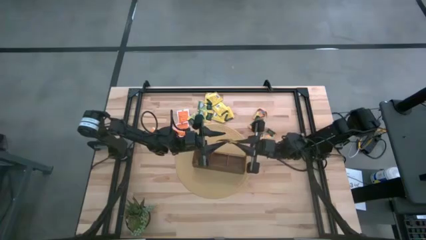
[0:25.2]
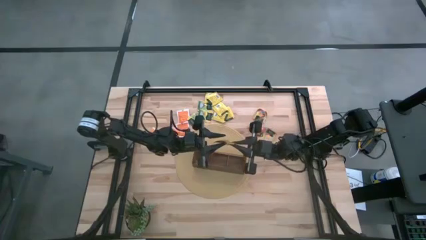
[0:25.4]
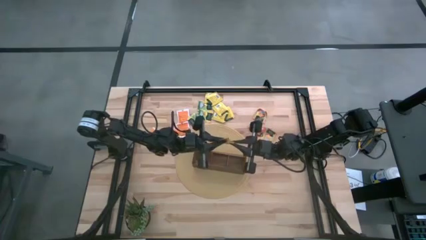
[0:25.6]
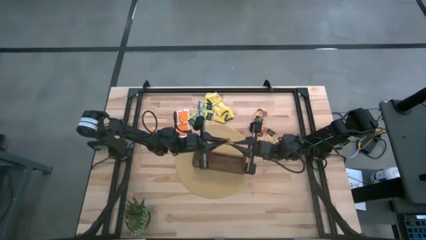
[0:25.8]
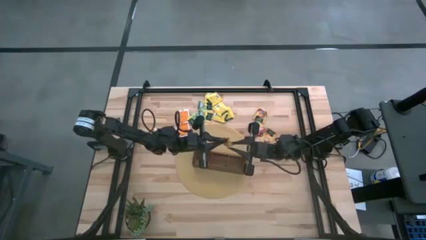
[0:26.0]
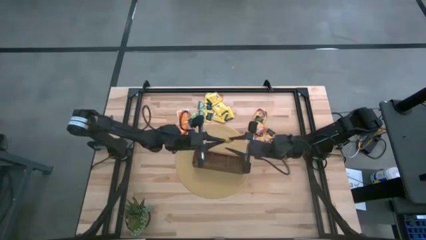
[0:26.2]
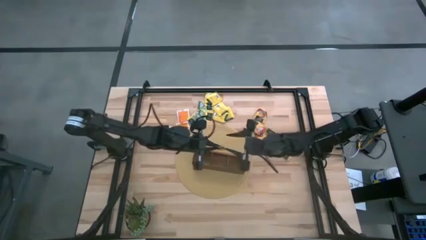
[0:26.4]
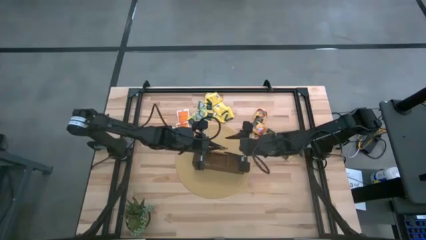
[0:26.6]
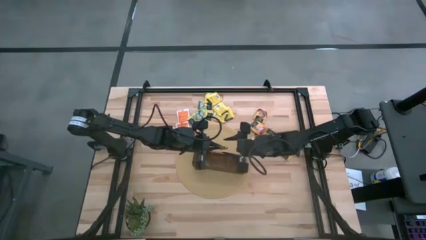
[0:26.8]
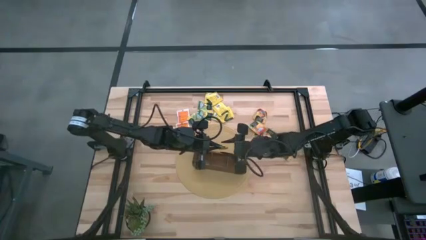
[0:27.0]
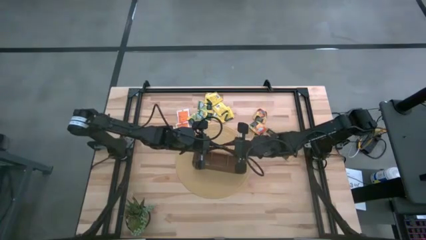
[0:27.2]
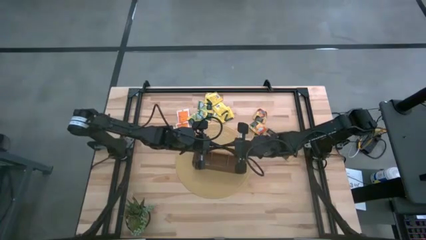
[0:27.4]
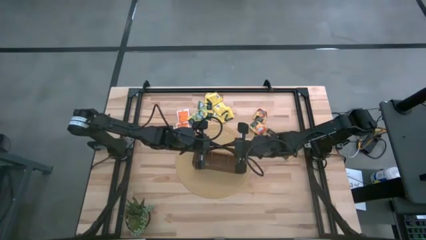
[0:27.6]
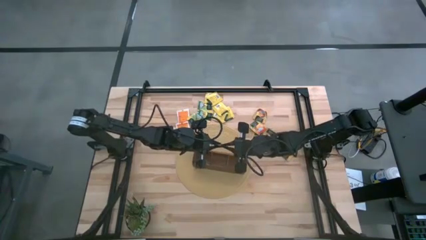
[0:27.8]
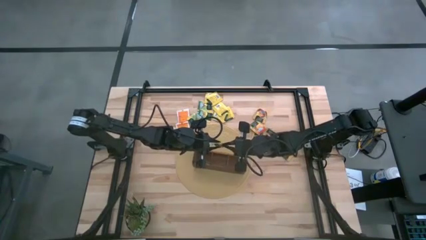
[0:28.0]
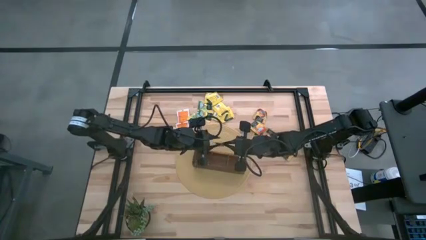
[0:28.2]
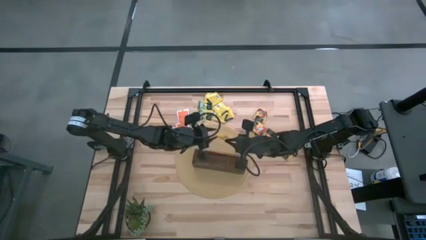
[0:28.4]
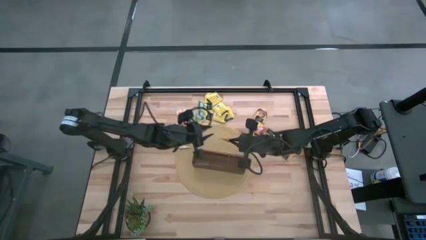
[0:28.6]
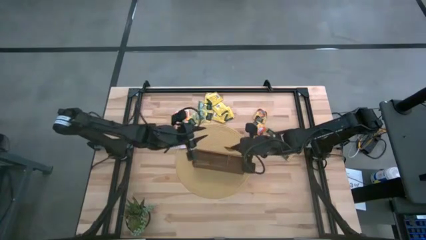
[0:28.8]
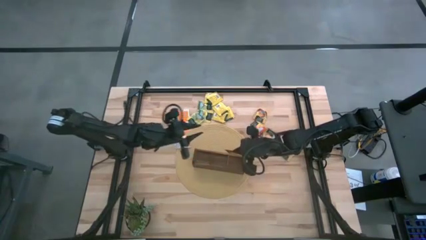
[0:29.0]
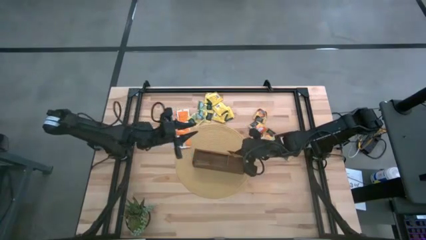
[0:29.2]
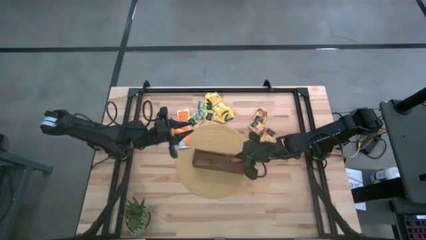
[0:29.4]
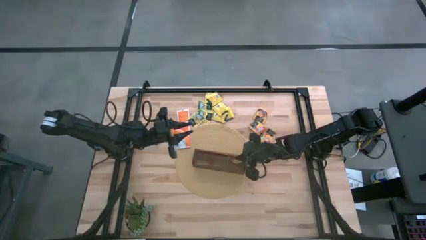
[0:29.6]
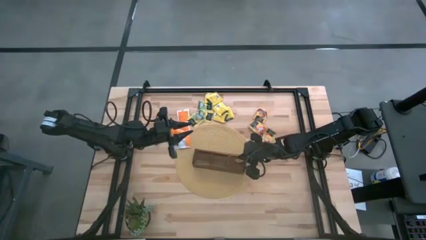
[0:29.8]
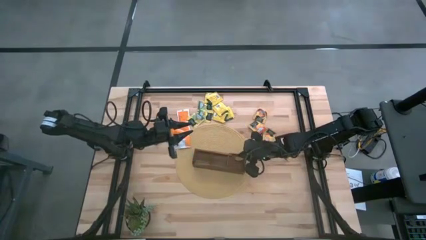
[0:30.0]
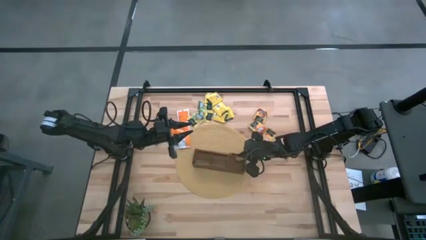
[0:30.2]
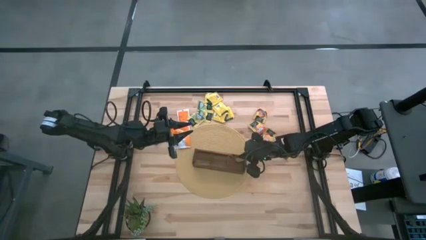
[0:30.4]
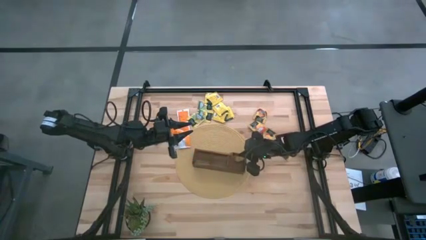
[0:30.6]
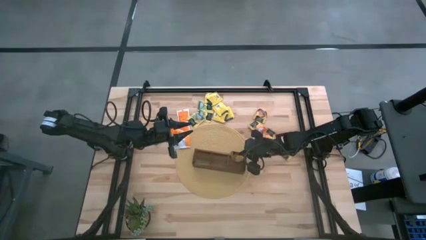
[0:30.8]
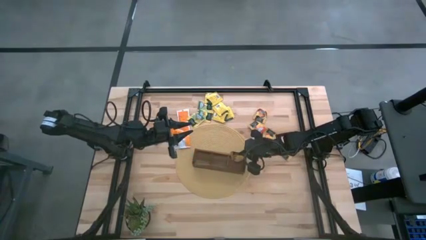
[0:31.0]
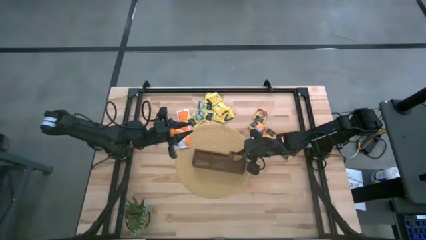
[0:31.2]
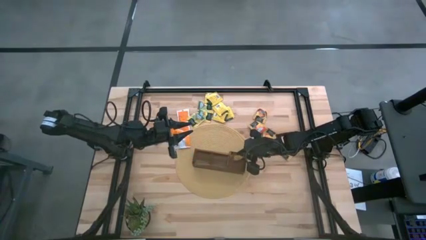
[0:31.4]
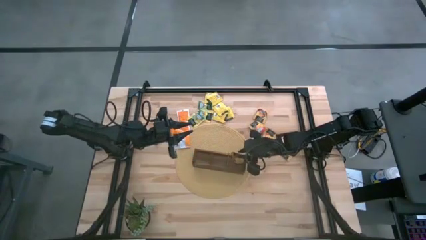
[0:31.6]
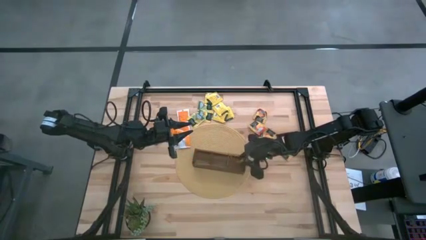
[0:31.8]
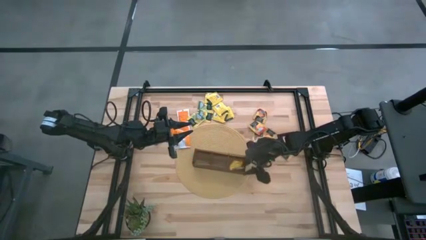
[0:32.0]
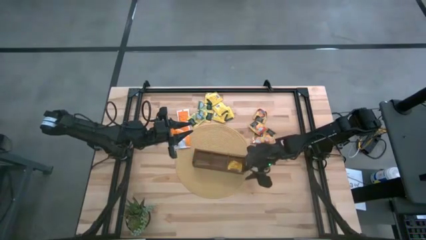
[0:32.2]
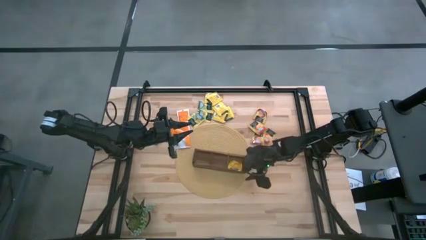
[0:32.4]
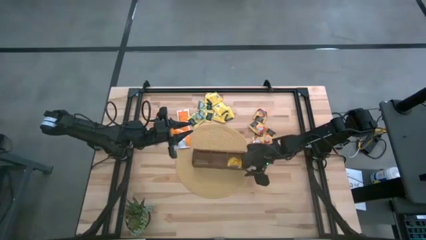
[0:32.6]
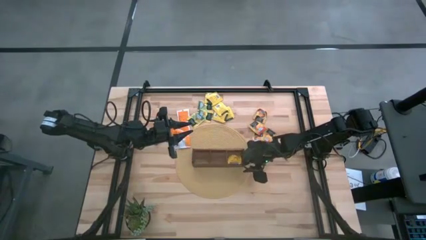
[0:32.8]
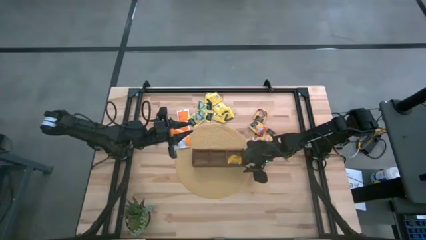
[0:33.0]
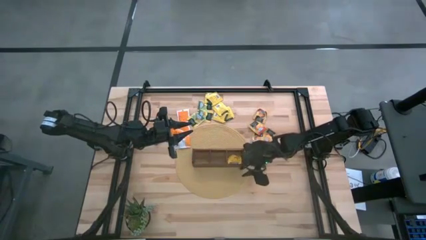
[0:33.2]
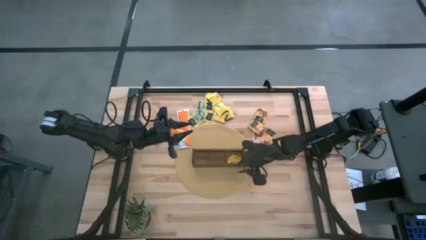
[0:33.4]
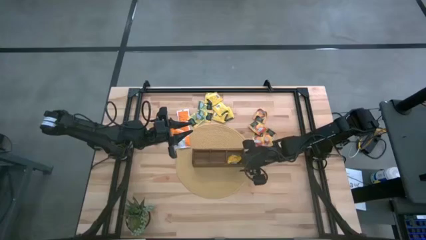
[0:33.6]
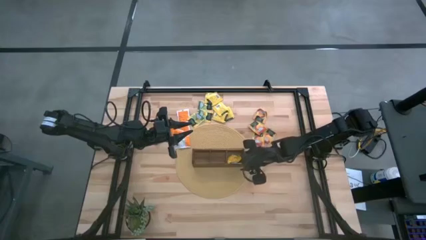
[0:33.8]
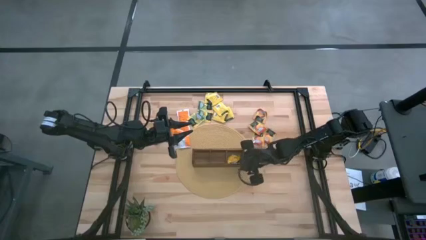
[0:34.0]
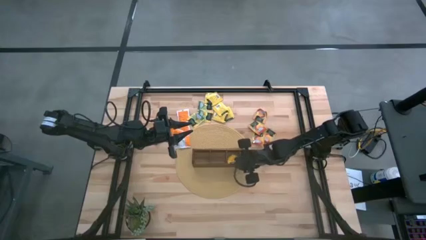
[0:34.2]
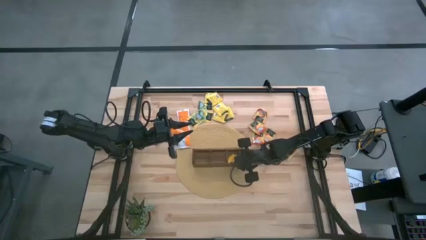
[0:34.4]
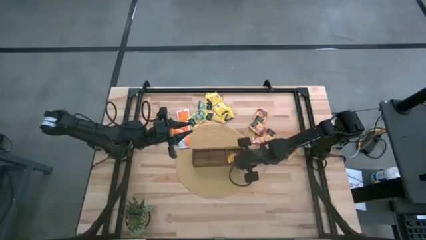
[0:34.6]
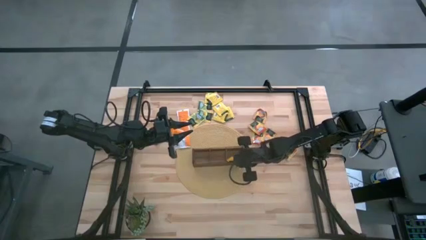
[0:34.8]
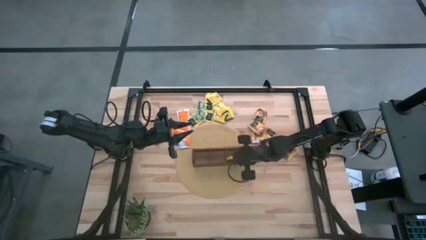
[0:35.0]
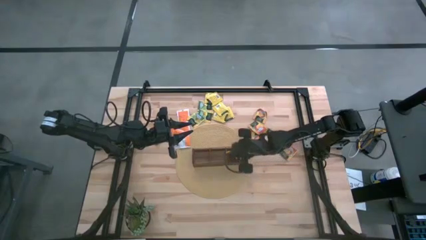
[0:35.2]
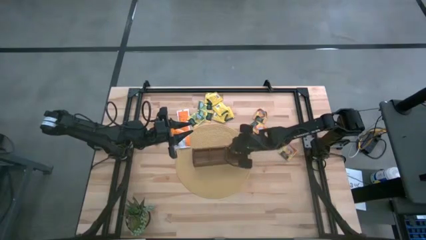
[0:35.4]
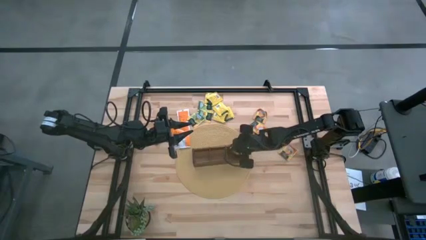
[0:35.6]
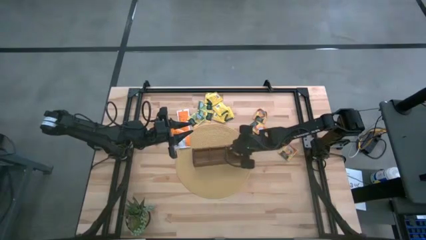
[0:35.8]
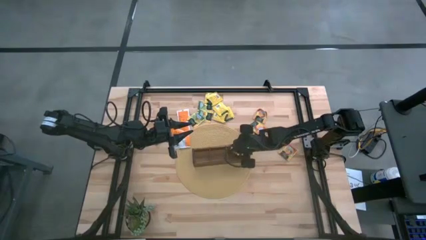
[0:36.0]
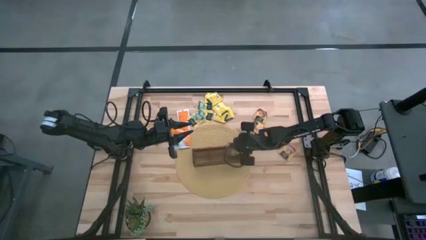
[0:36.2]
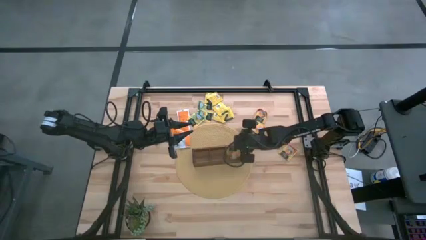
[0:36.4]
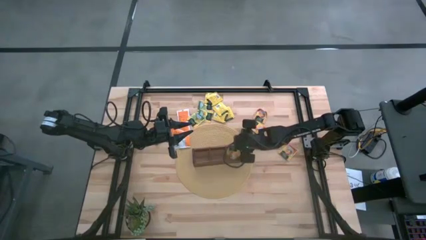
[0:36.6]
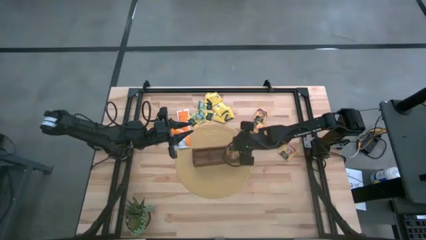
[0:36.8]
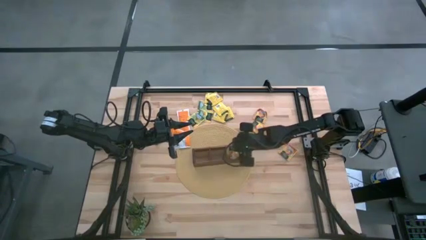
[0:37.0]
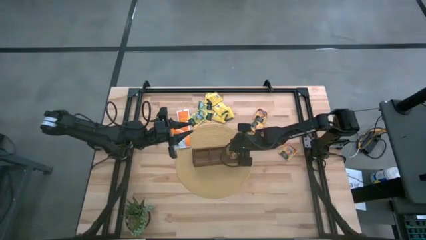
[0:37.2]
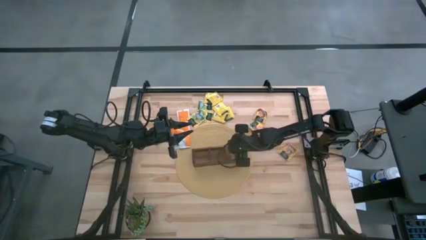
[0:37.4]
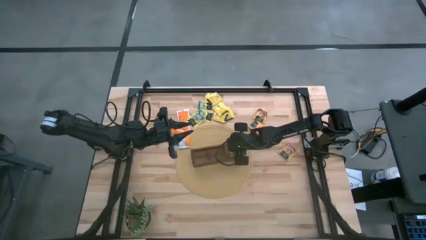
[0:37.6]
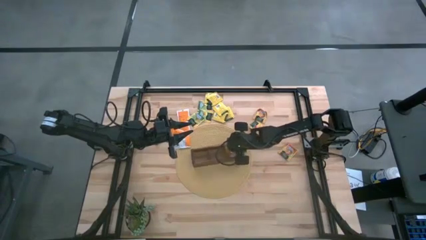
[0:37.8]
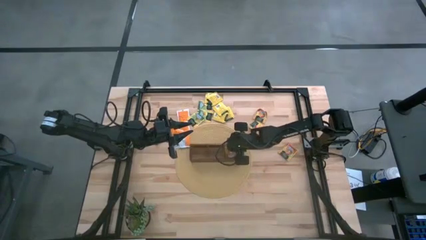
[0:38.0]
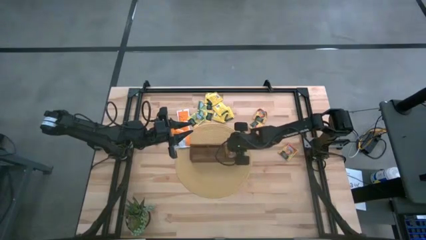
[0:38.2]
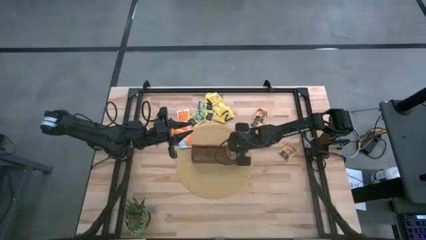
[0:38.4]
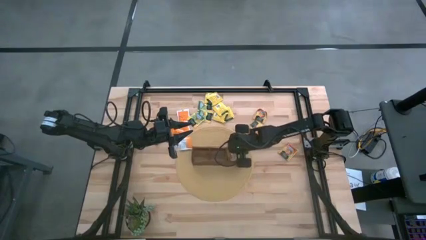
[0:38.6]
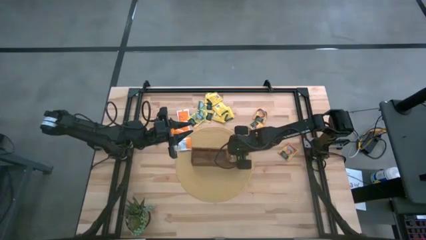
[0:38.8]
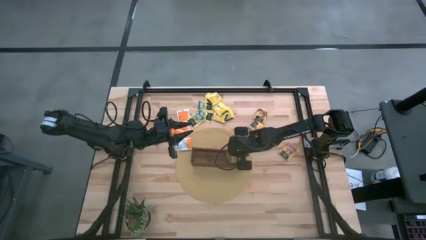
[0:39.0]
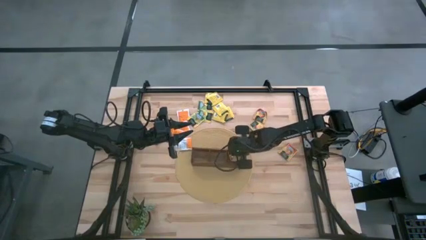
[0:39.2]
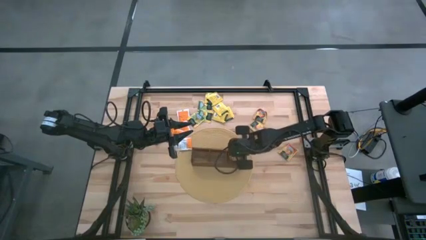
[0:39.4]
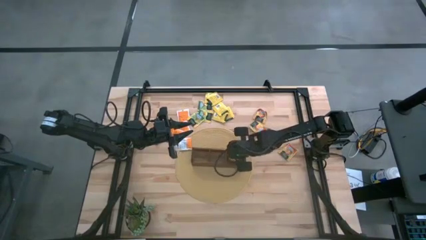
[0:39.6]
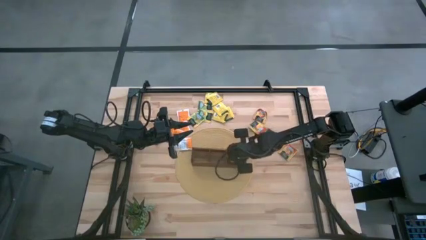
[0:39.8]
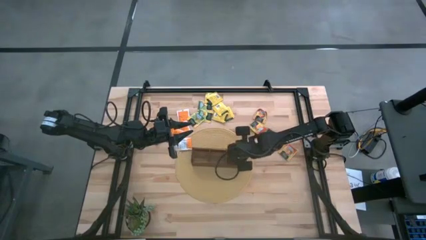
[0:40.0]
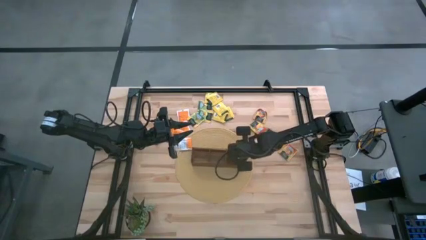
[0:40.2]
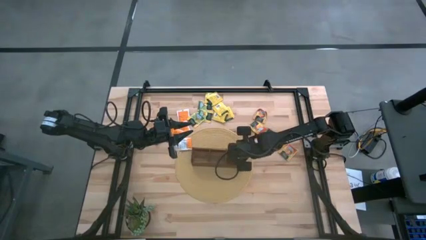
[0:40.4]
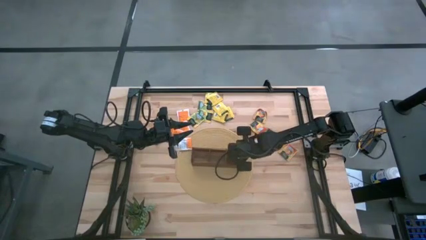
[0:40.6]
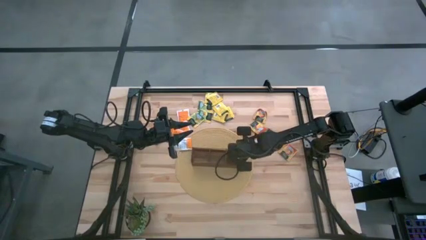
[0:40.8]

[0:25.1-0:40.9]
Task: Pick & Place Tea
Put the orange and green tea bag into the wooden organizer
